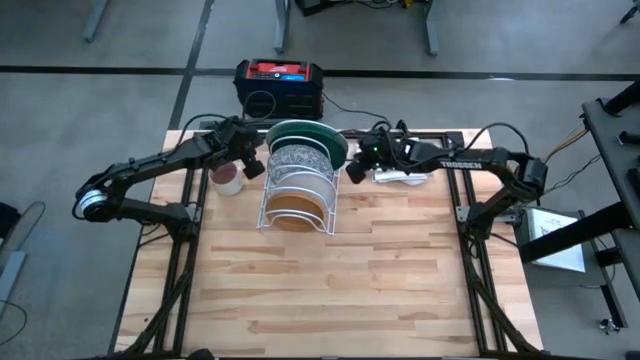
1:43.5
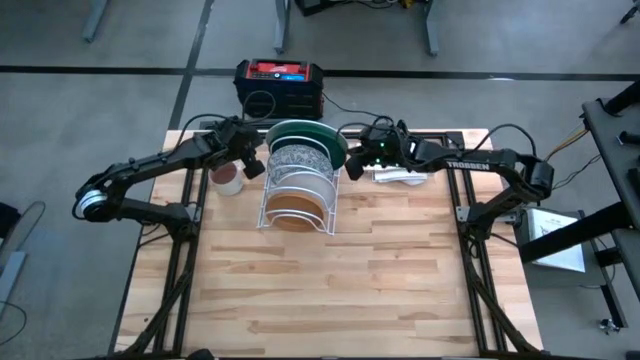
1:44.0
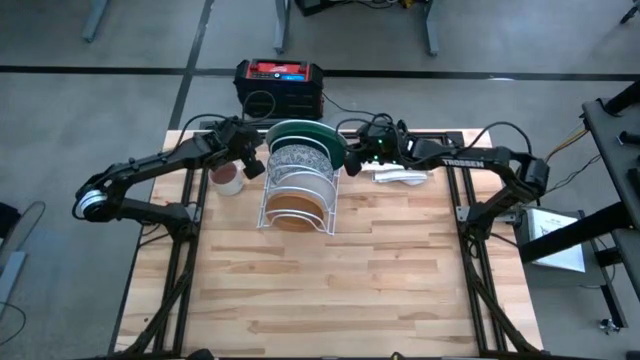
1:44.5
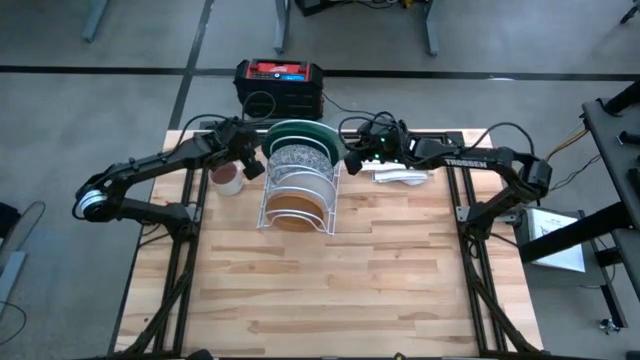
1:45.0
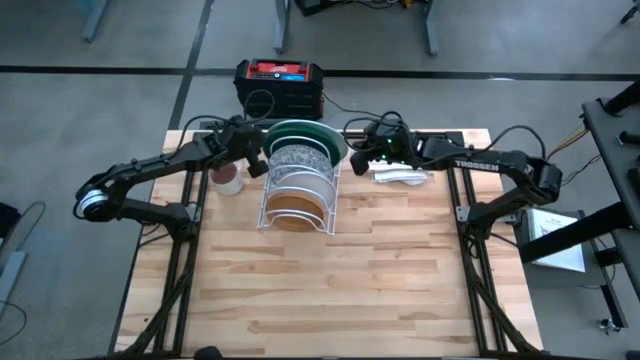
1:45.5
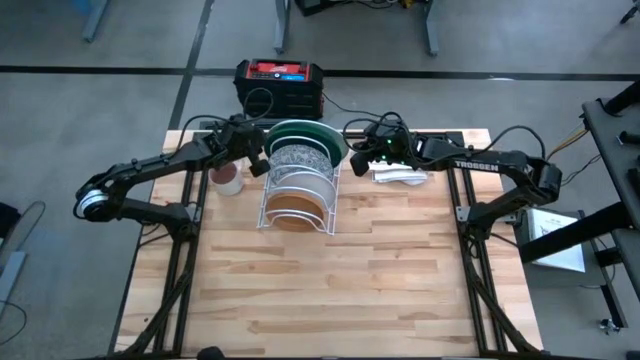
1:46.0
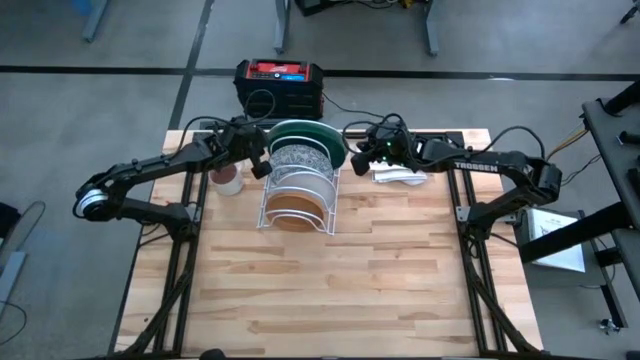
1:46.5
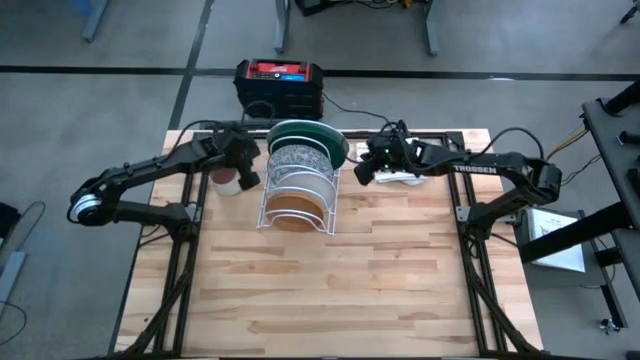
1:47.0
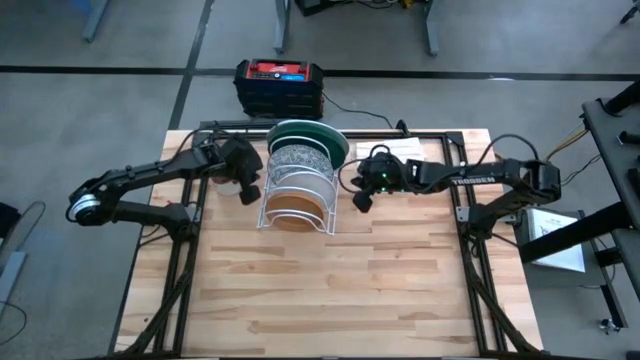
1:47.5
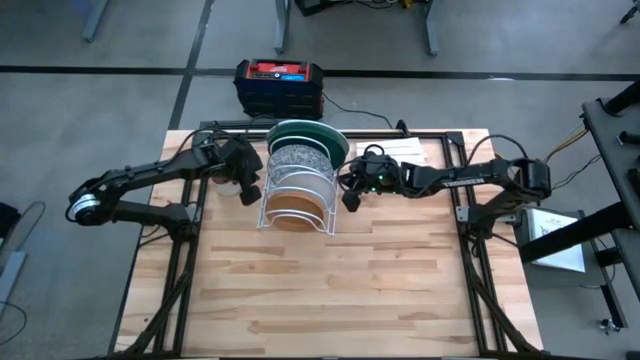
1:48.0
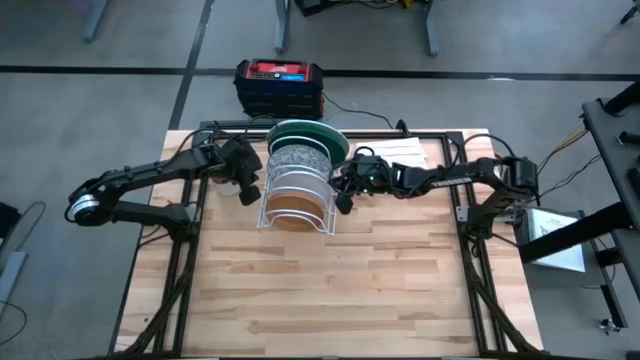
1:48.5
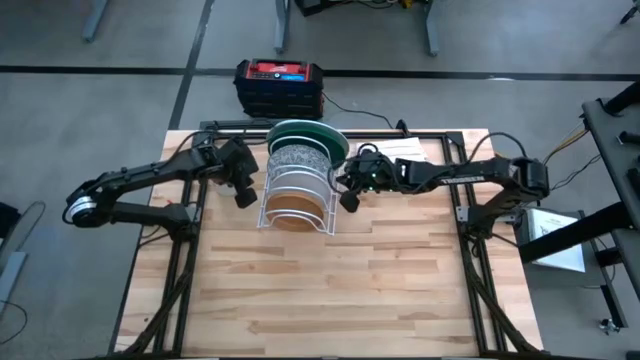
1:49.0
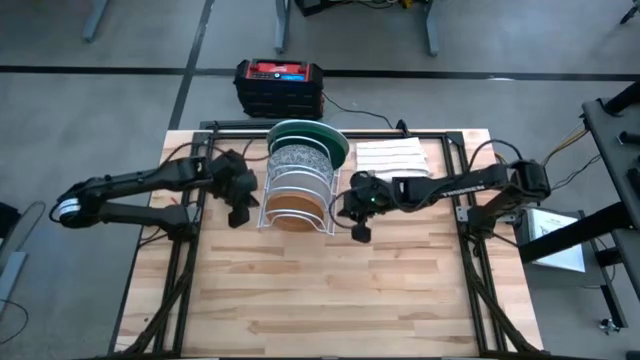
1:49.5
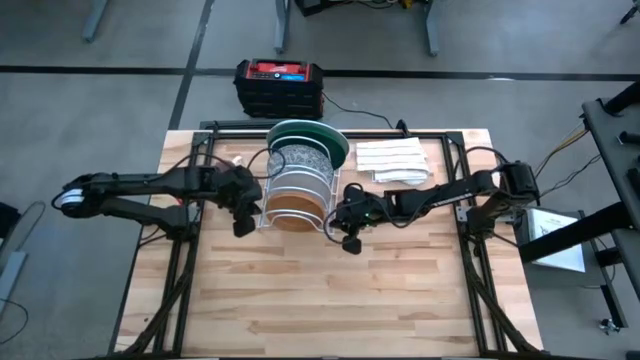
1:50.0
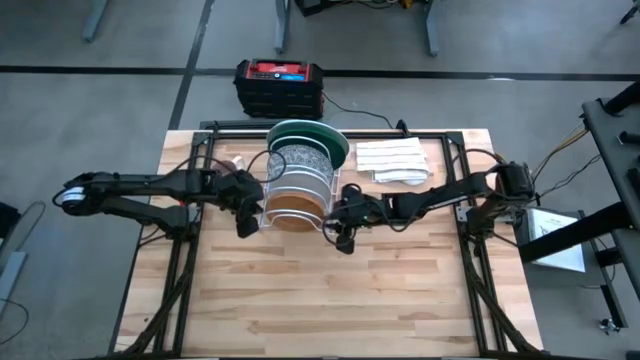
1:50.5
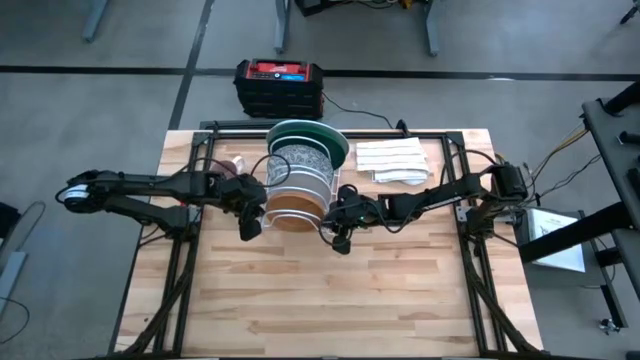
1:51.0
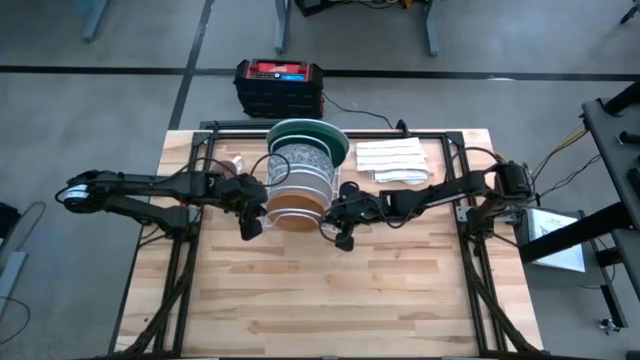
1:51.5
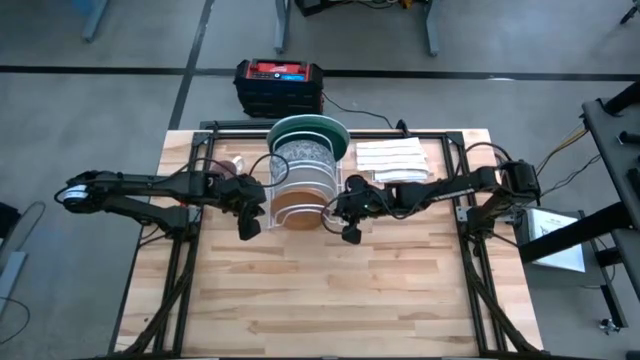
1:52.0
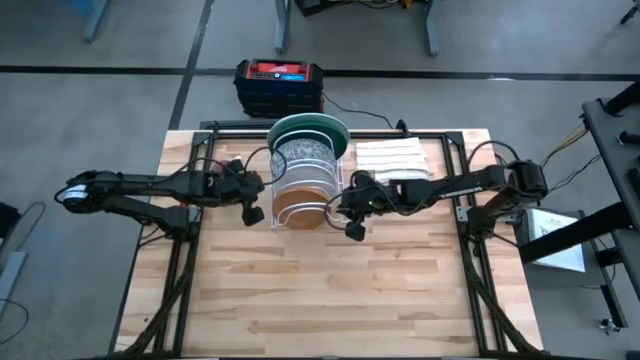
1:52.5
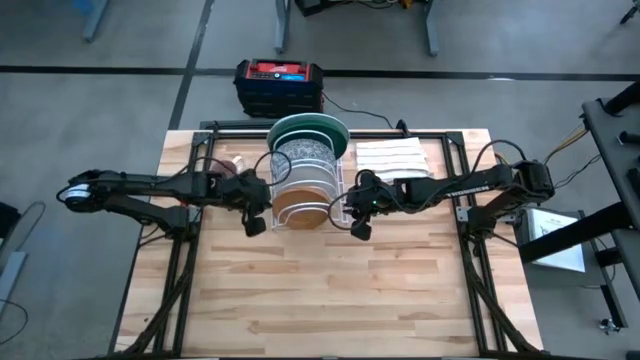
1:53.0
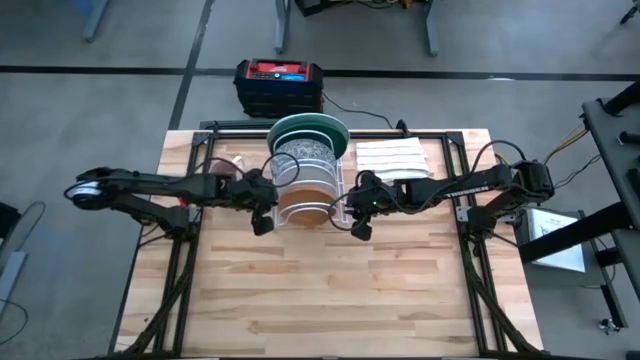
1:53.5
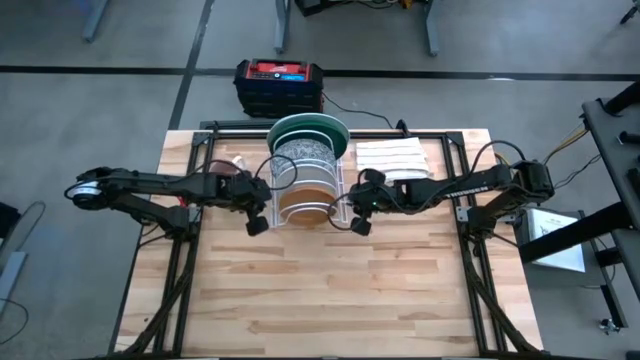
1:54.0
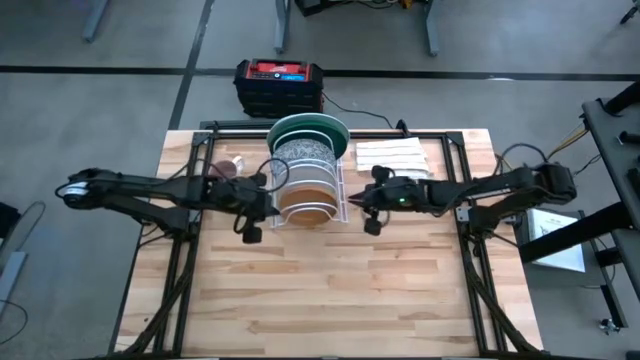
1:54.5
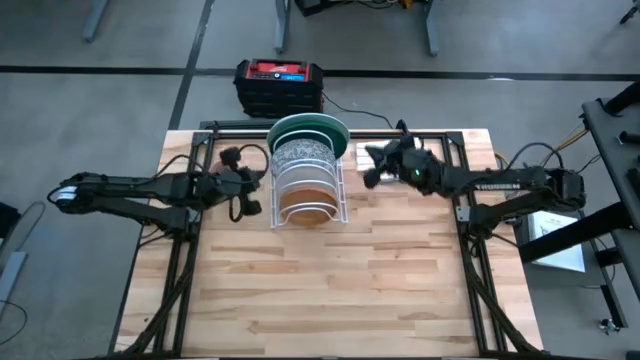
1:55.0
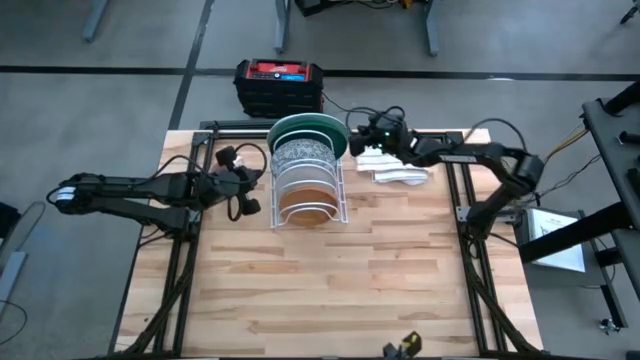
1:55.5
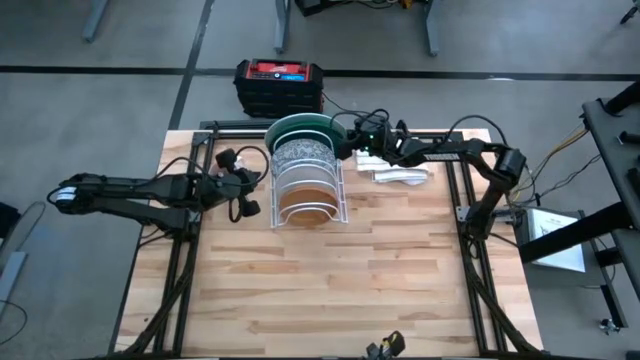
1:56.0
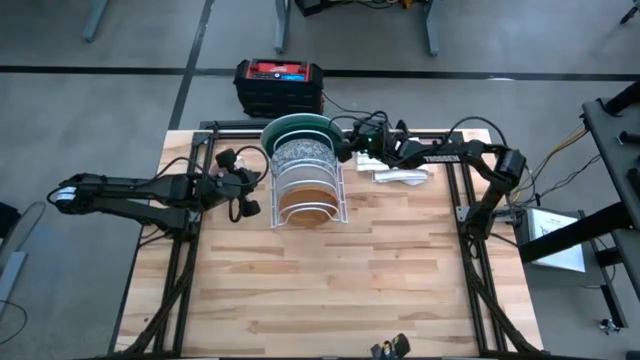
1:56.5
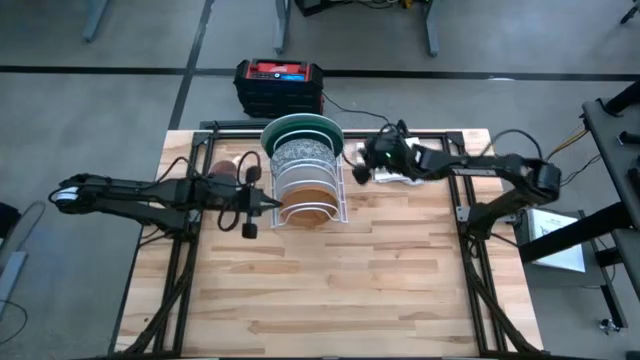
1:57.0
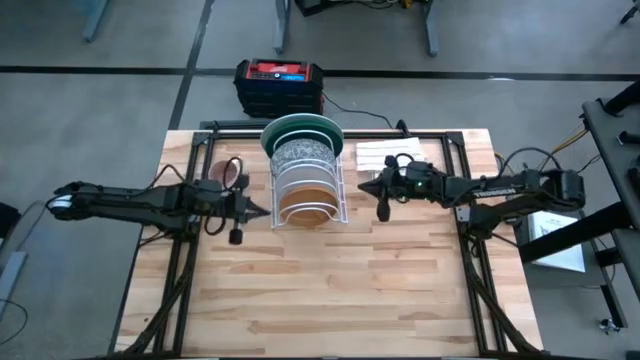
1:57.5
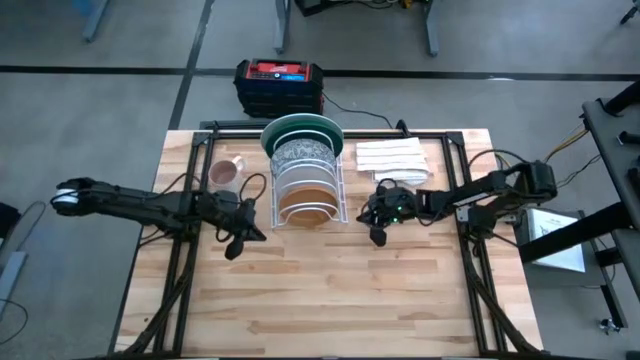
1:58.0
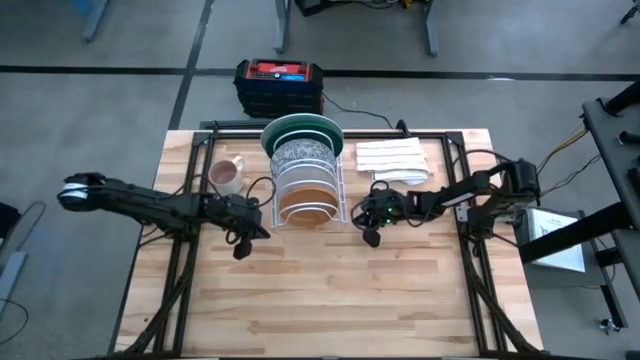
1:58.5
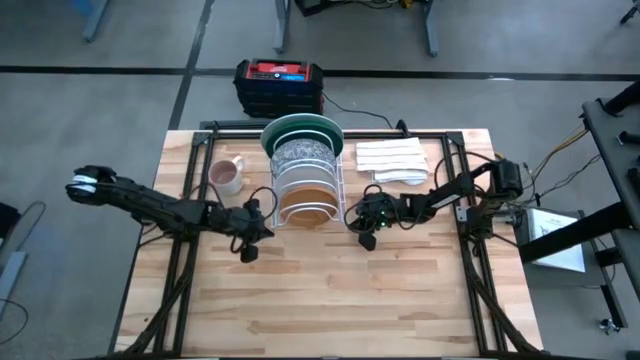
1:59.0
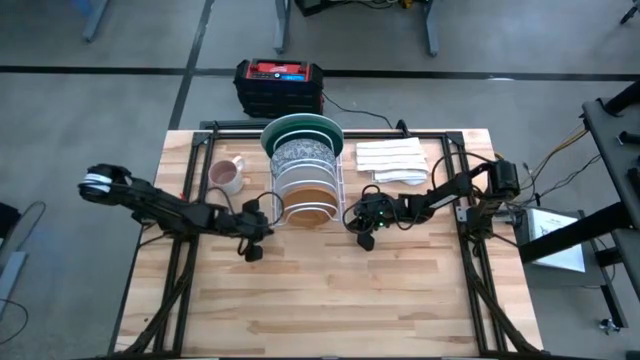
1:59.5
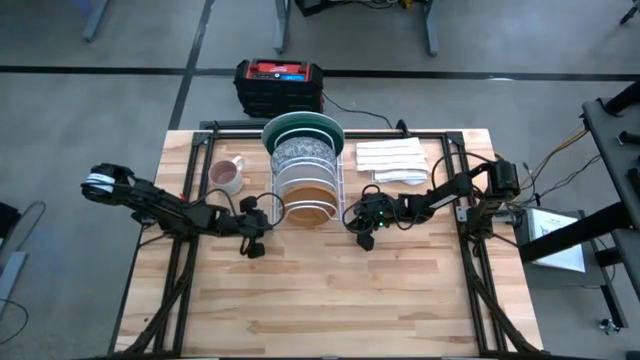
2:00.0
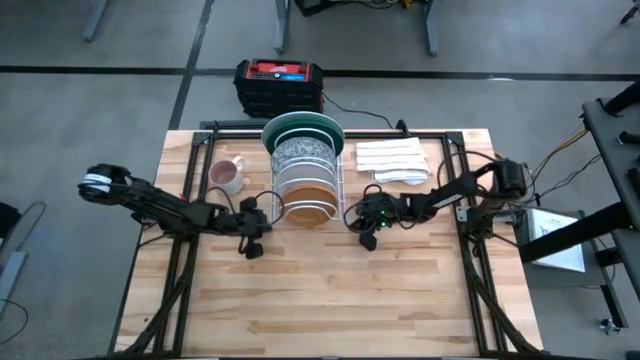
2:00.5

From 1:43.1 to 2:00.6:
Task: Sort dishes
Adjust the plates in the dish rack

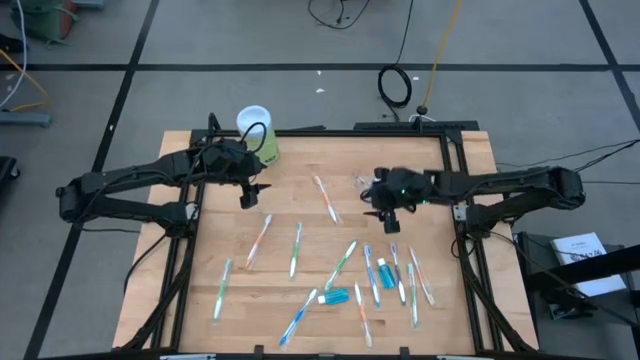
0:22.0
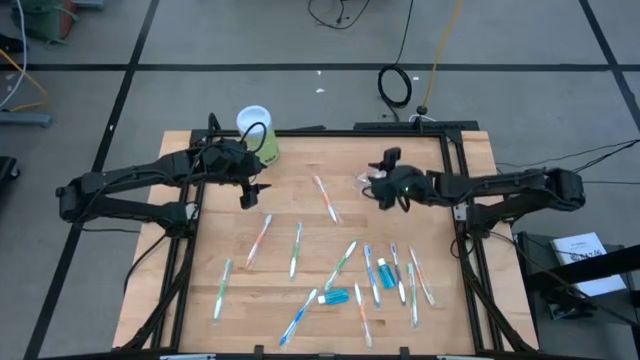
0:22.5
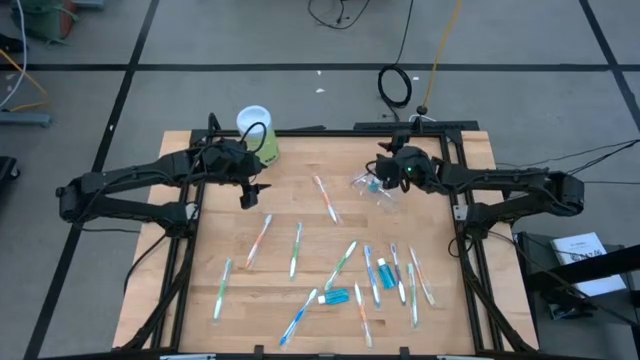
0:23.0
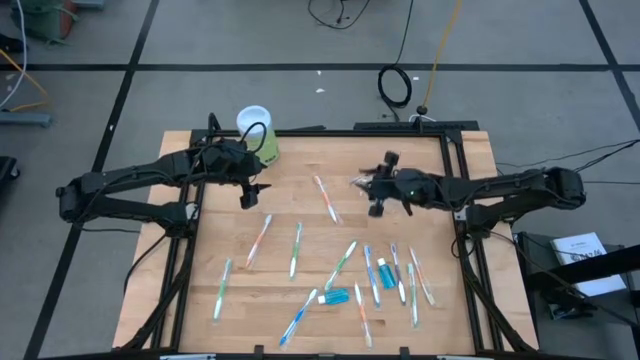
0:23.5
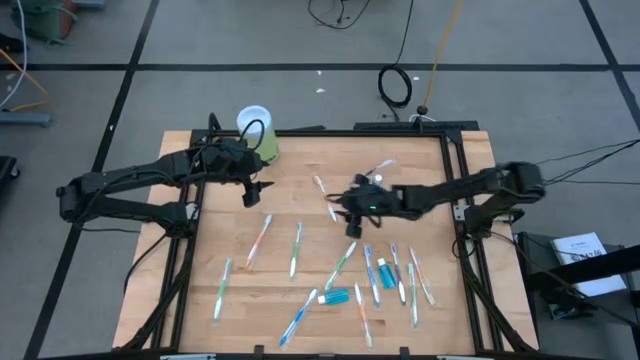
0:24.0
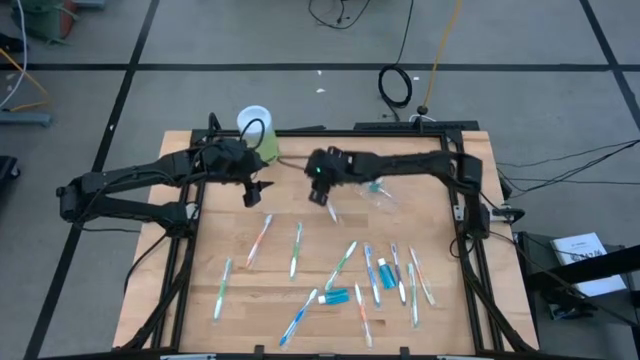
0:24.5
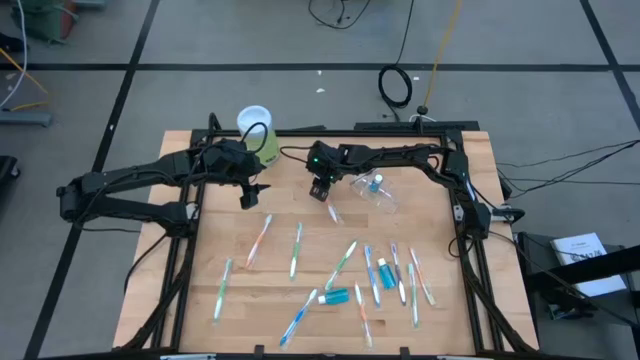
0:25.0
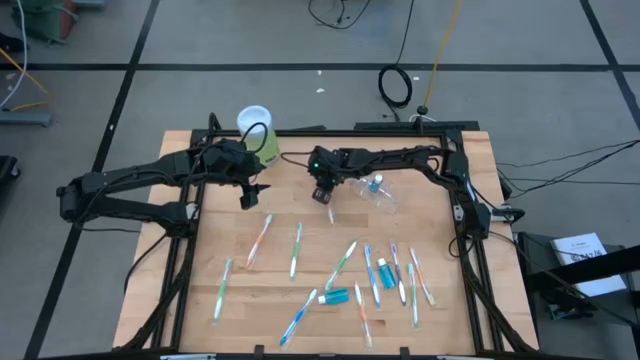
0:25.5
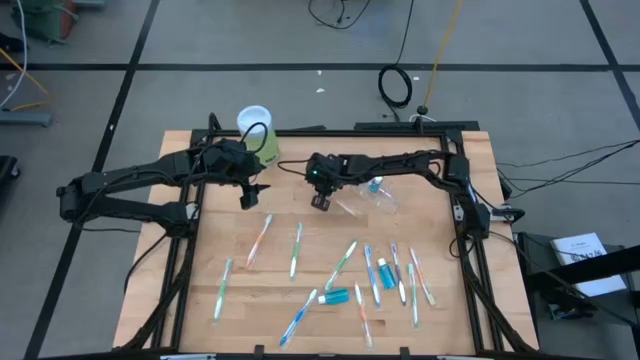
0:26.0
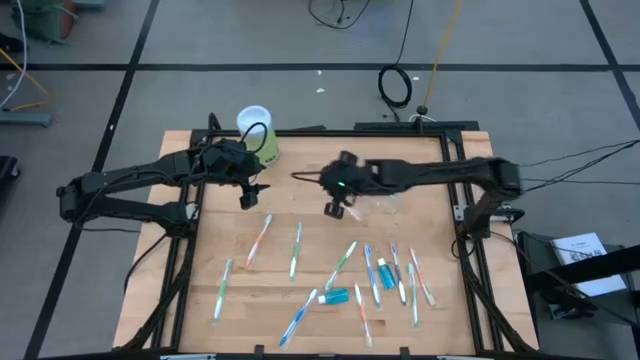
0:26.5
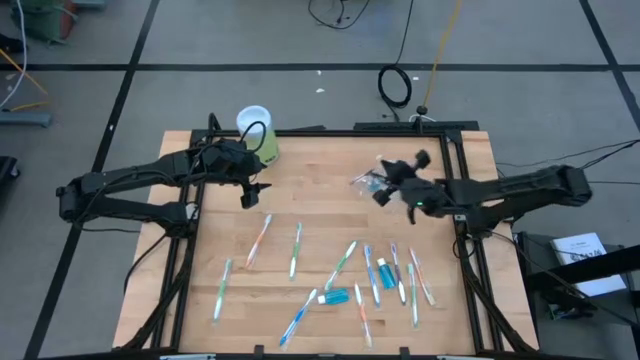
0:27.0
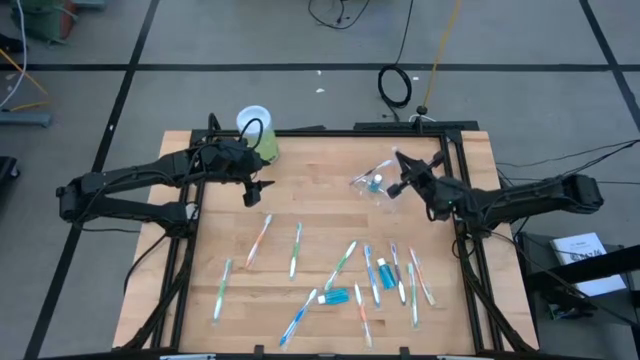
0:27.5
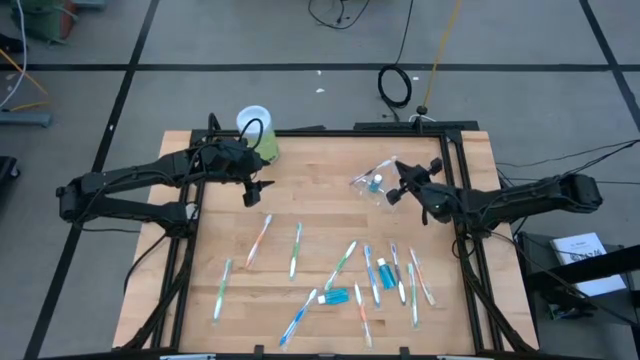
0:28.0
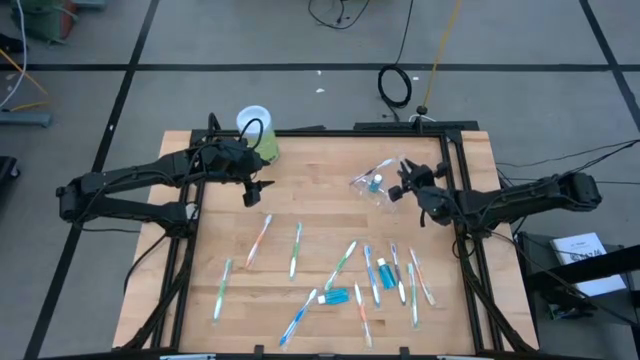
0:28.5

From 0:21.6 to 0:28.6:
Task: Pick & Place toothbrushing station
Put the orange toothbrush into the transparent organizer
